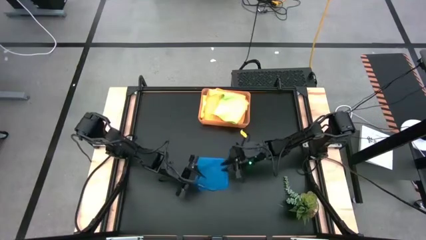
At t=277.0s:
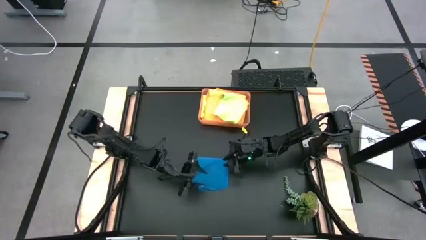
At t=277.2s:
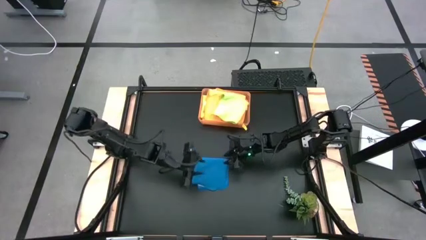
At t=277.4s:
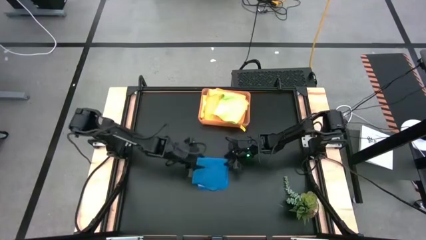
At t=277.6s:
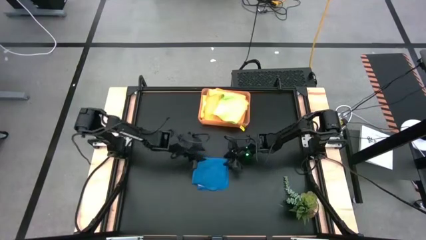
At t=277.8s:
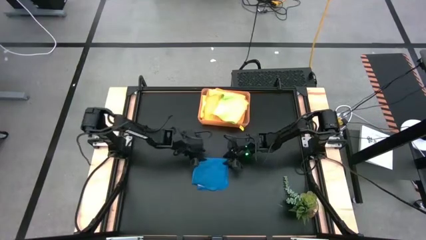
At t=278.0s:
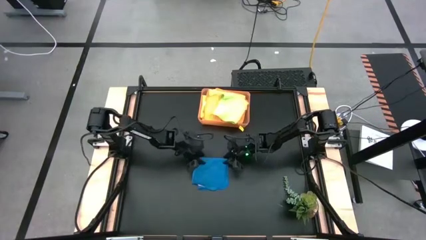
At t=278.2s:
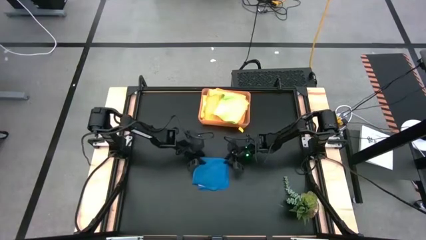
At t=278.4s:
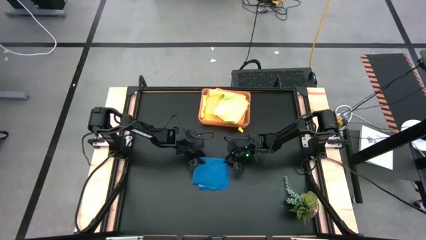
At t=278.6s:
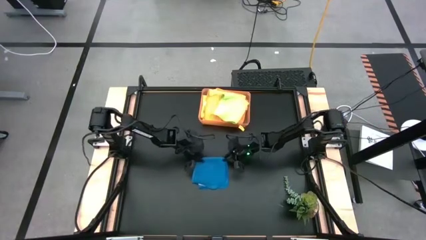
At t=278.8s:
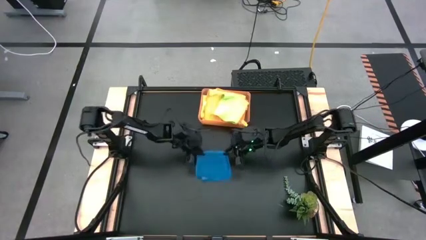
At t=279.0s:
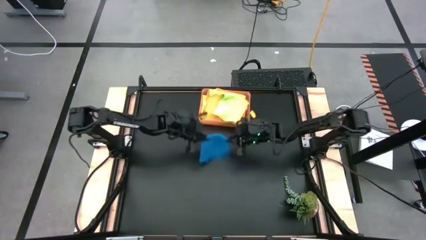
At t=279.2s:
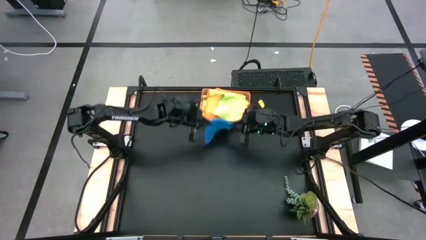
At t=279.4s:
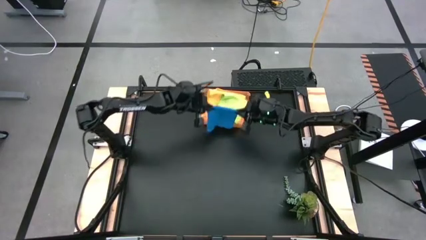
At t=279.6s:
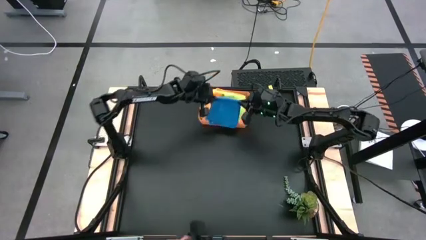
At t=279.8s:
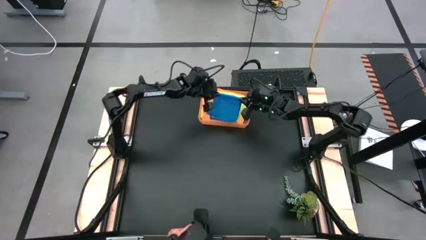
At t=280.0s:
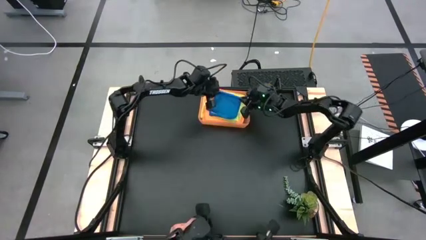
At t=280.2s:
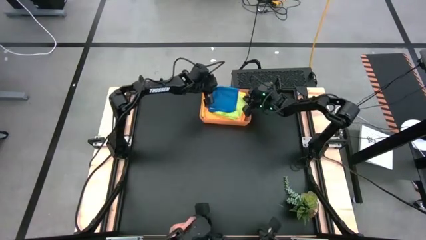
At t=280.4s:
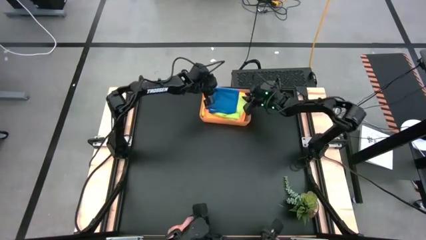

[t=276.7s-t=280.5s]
Task: Fold microfiber towels
Put the blue towel in the orange bin

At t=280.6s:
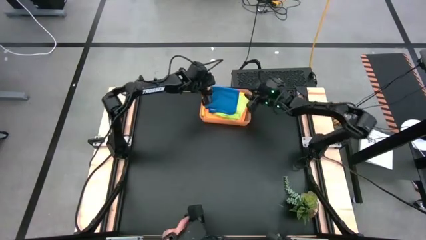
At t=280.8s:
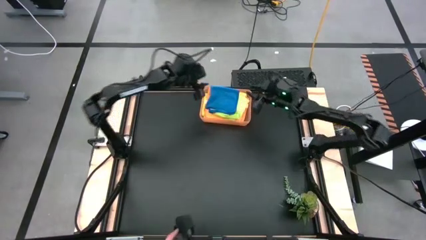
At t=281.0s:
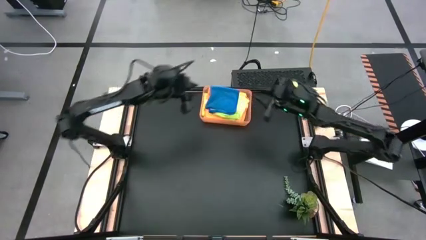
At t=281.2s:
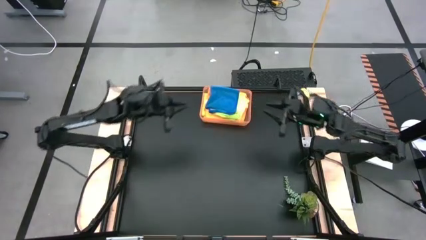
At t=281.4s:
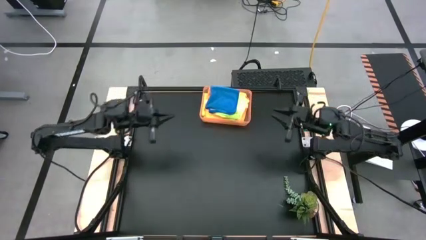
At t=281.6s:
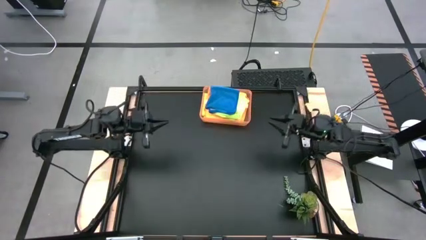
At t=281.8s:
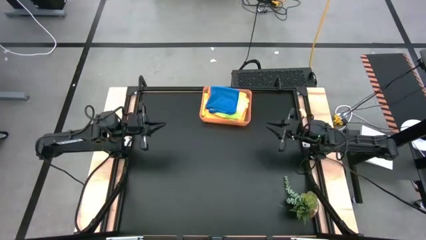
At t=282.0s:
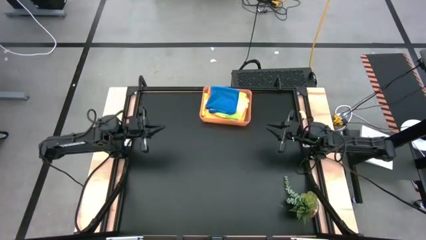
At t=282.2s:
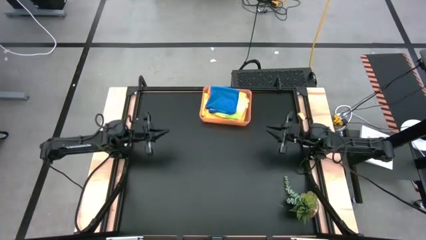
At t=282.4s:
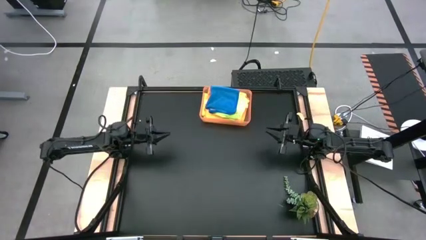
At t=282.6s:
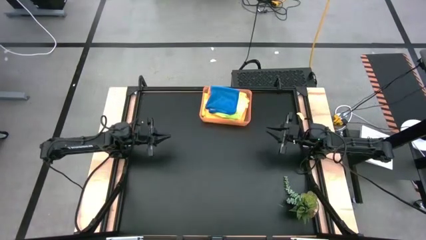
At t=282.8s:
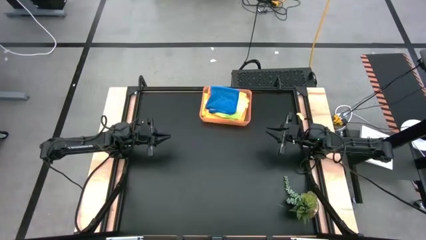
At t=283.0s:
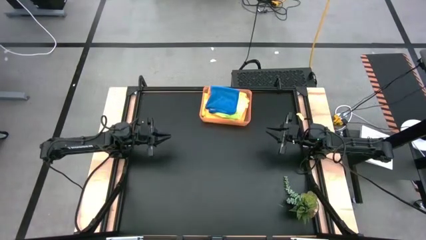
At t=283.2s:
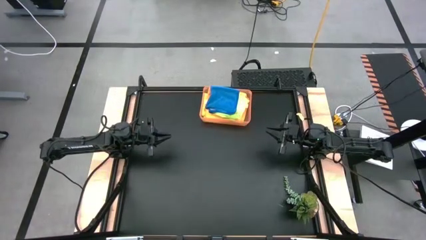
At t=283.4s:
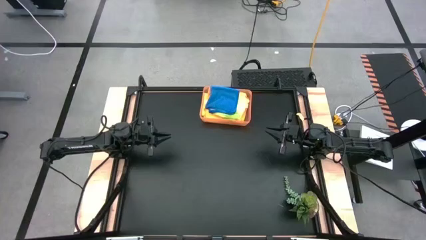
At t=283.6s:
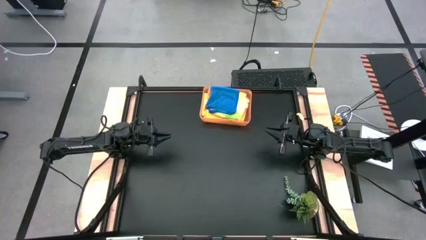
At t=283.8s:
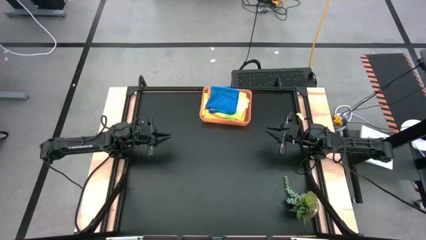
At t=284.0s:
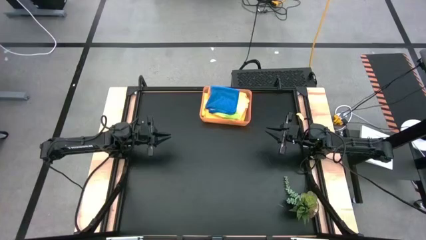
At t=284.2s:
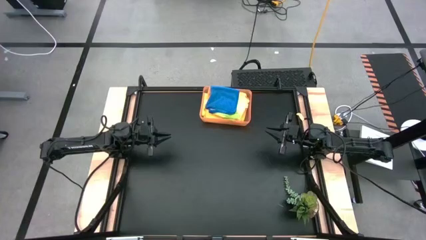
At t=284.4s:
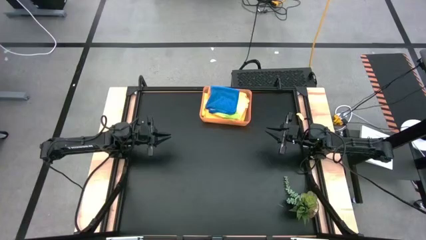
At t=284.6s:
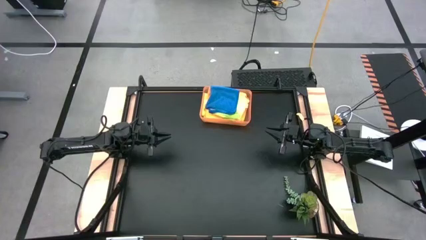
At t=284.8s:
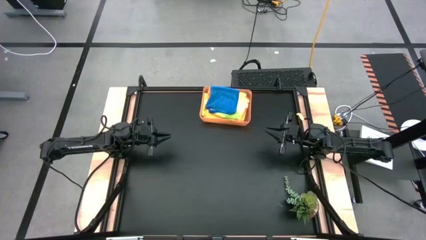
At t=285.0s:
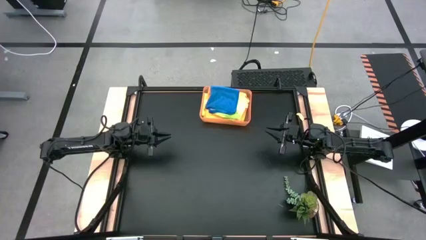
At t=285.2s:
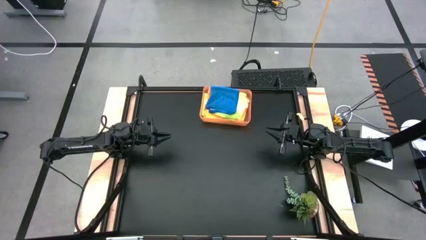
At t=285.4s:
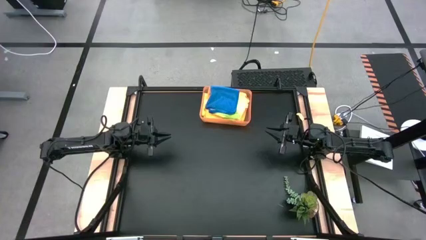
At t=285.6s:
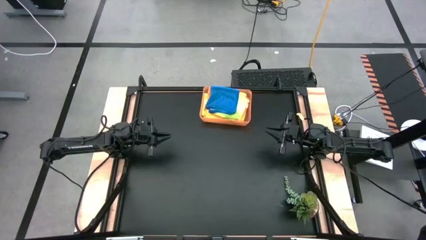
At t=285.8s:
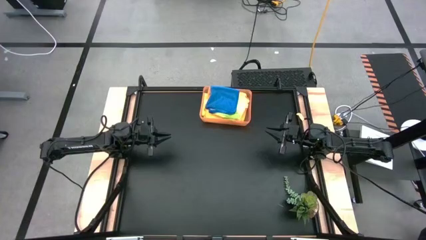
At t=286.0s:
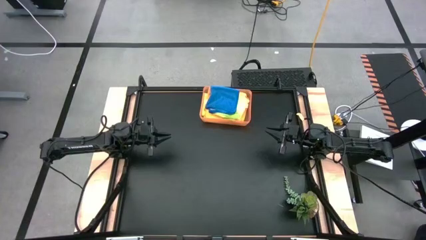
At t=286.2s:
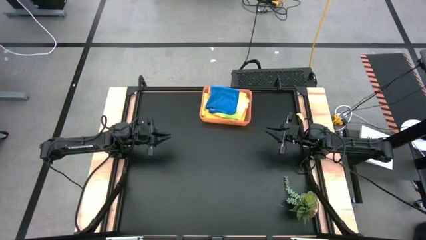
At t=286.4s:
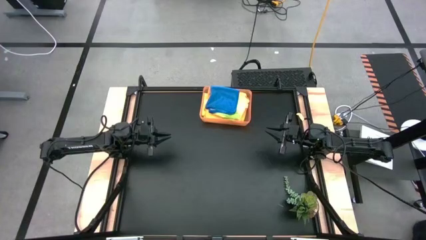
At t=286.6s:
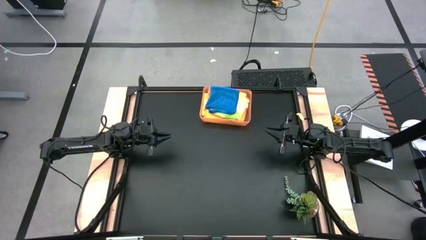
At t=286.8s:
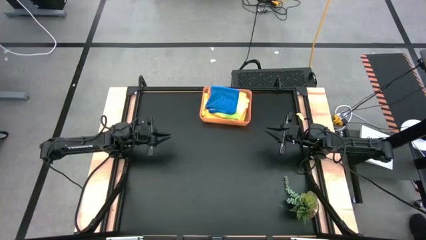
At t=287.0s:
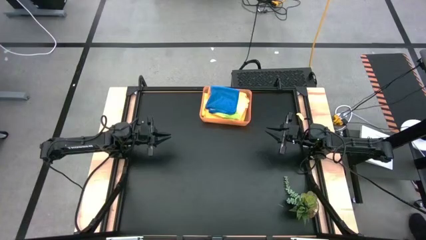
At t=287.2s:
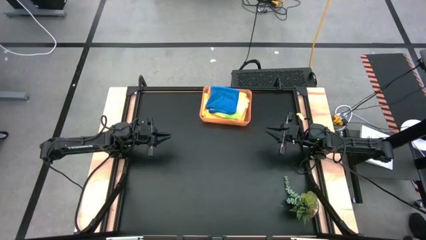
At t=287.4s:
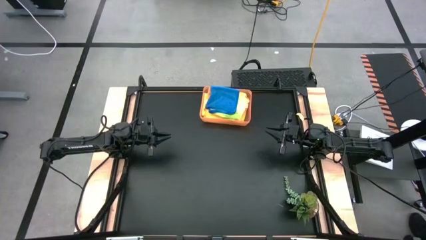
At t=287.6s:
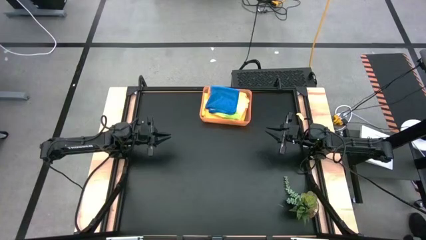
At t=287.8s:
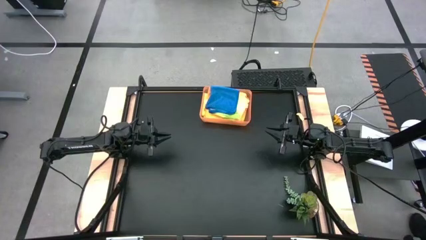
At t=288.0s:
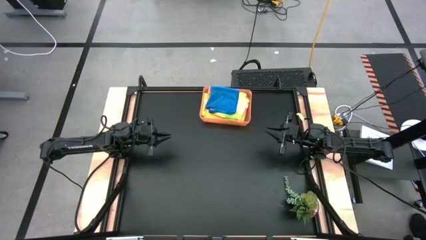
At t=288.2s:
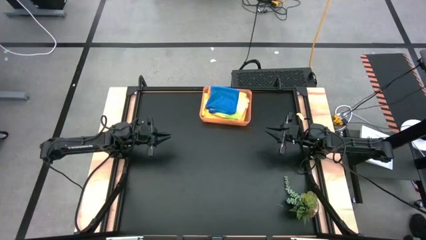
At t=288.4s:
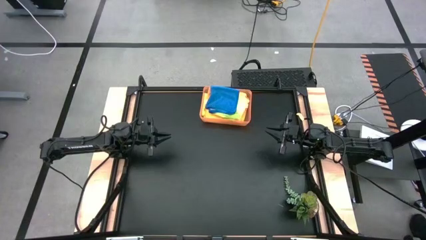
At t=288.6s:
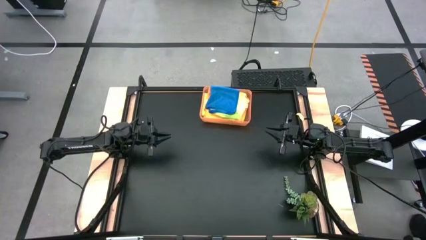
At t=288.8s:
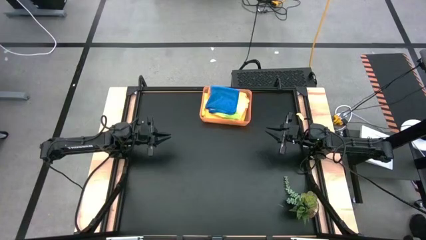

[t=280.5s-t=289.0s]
Return to Home Position

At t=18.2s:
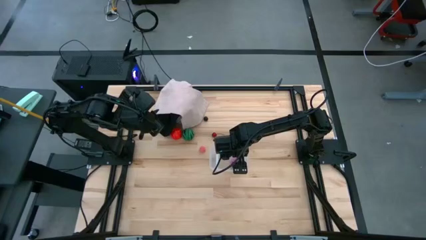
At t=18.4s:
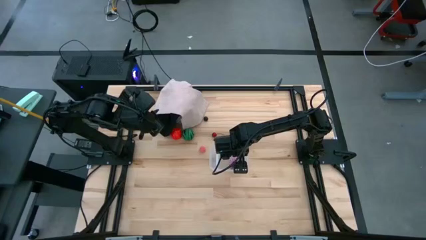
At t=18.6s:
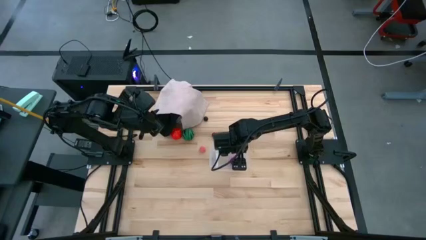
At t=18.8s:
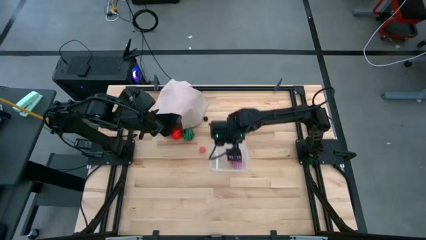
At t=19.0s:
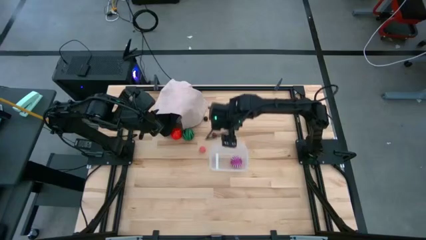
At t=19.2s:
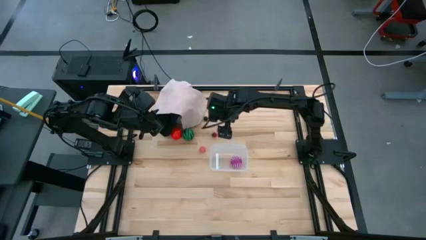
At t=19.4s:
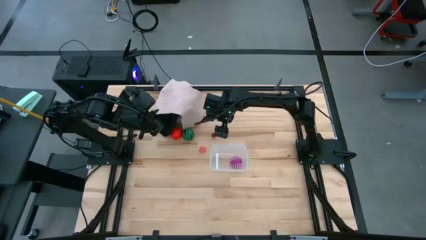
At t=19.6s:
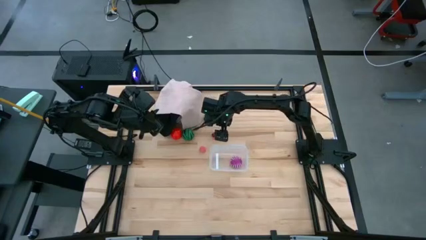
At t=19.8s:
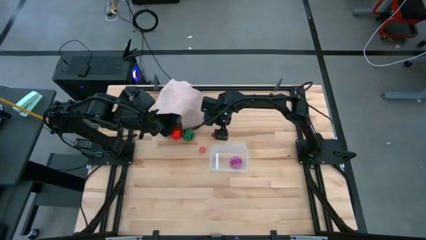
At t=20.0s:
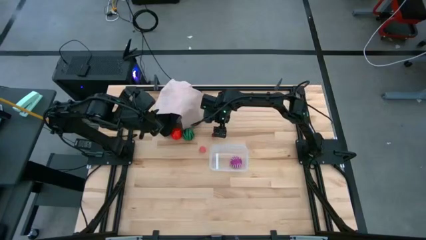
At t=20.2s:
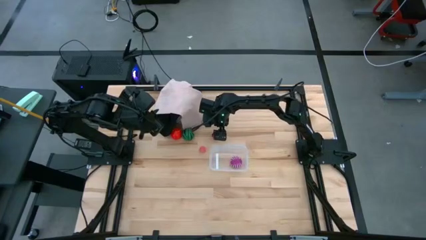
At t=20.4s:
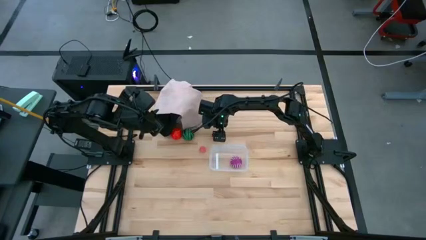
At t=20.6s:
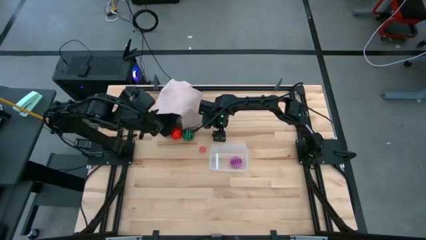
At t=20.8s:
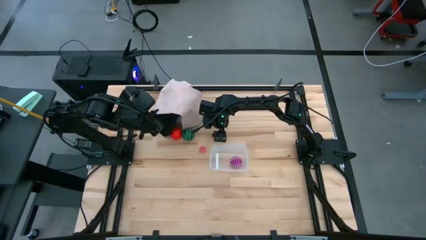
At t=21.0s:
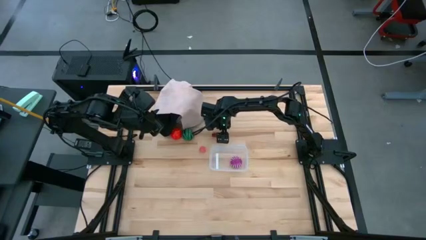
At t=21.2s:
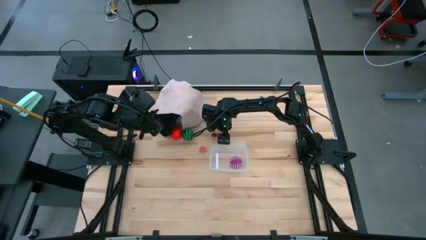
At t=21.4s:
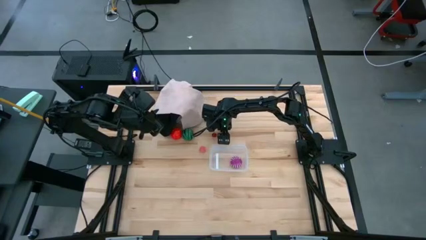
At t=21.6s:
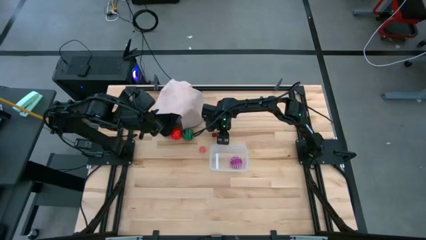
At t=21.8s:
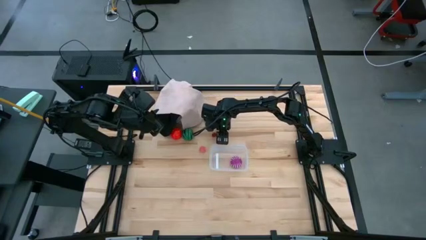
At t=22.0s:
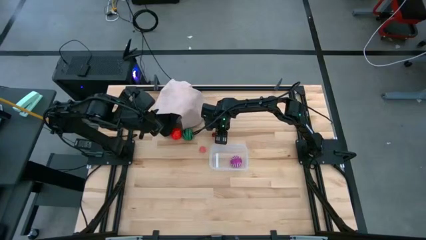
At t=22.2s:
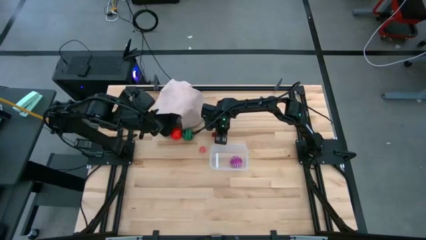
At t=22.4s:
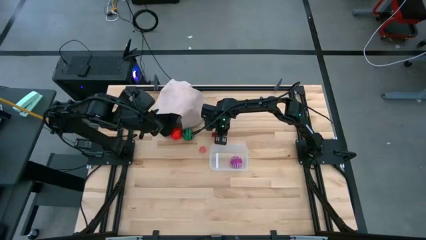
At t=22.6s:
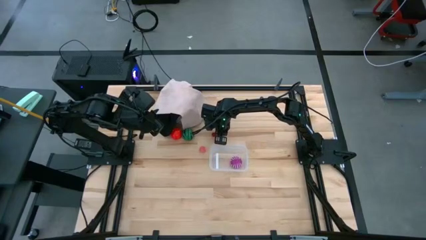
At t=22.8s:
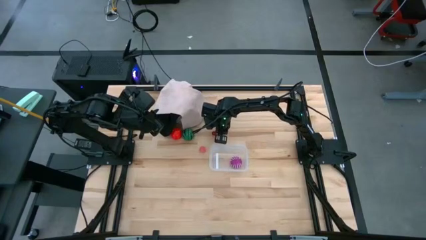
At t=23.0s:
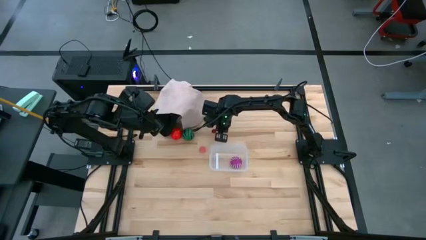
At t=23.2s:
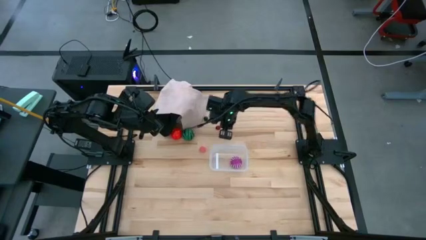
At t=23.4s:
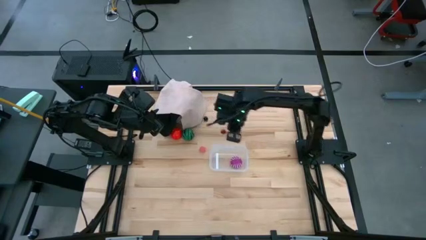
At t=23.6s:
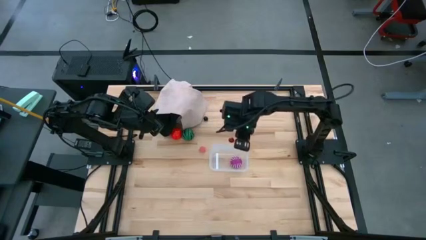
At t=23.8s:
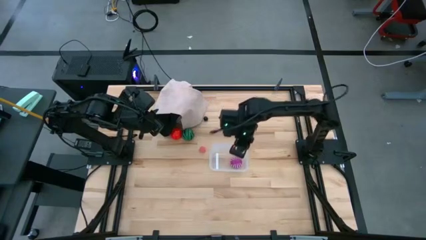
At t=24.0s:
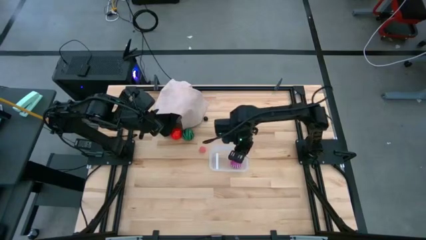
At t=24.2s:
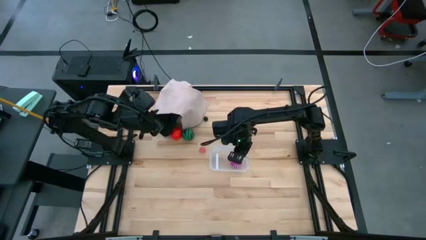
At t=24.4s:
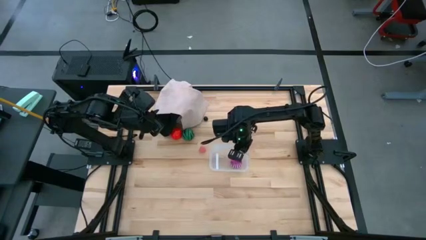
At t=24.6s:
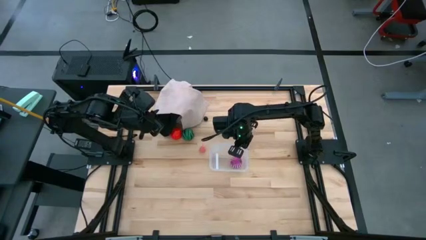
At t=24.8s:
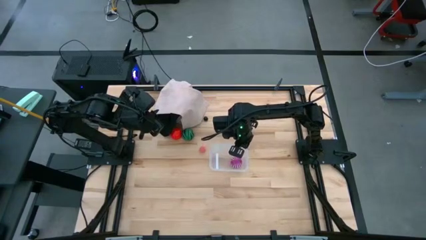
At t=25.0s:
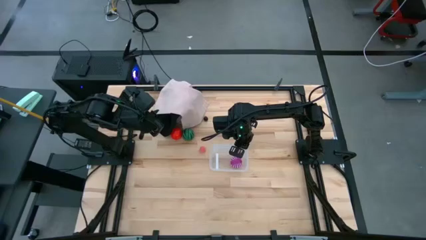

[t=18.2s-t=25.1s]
Task: Pick and placing Produce into tupperware
Put the cherry into the transparent bin
